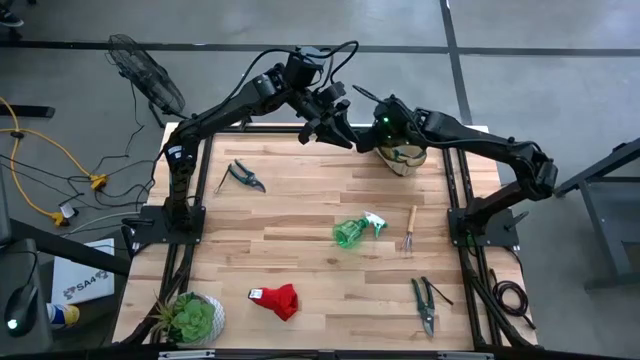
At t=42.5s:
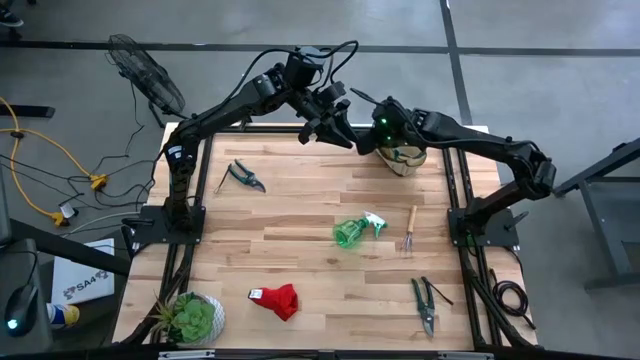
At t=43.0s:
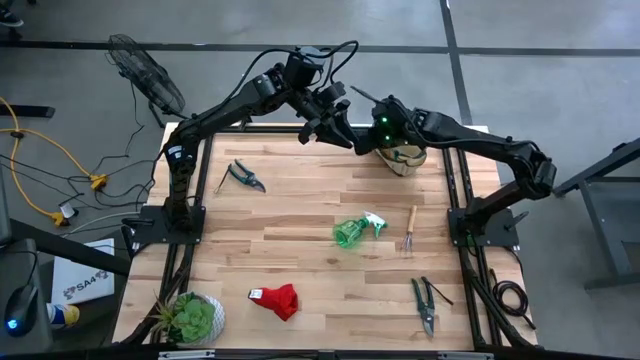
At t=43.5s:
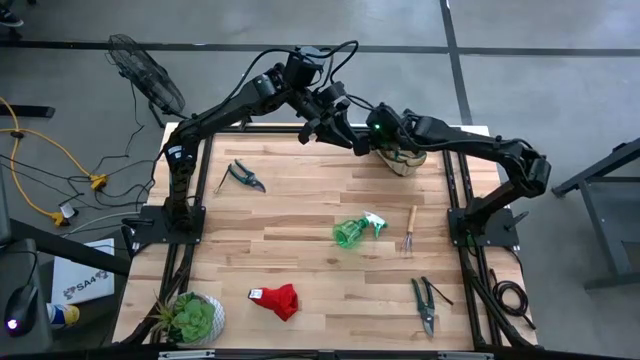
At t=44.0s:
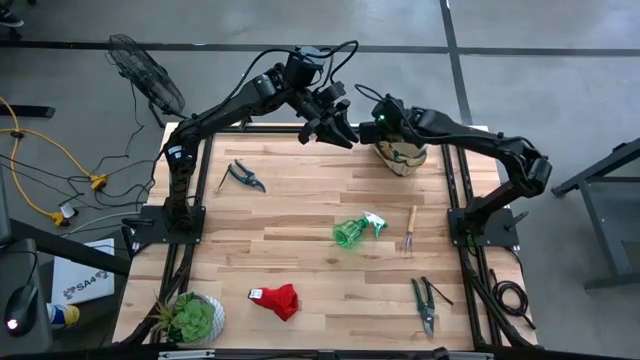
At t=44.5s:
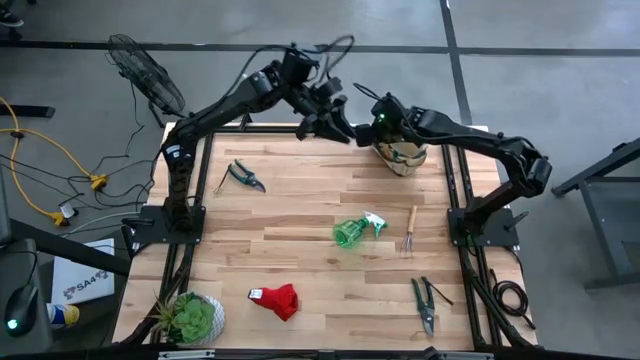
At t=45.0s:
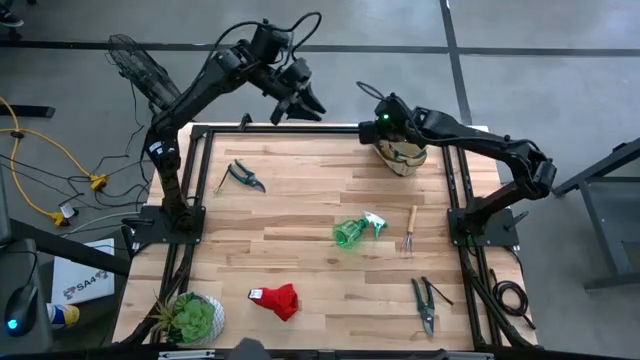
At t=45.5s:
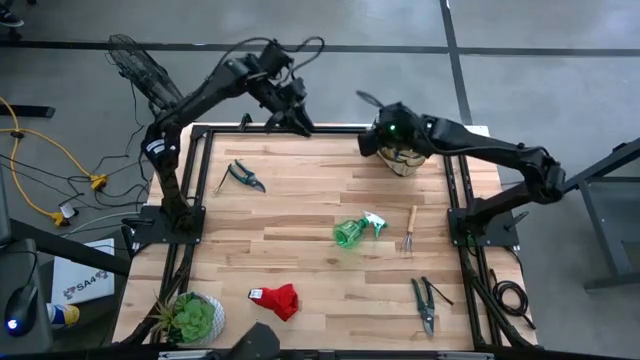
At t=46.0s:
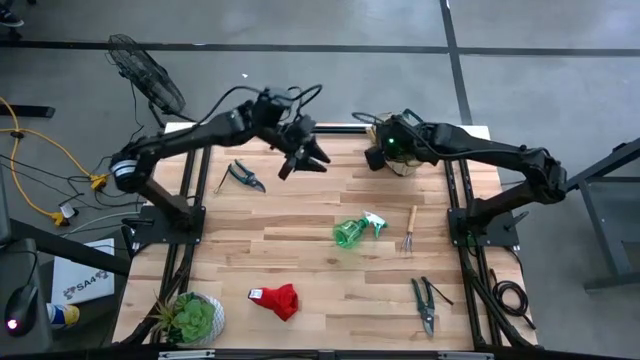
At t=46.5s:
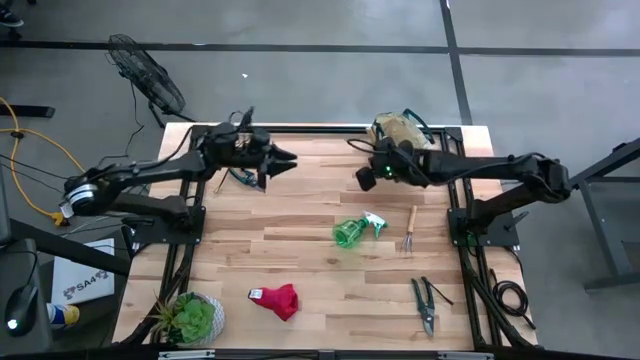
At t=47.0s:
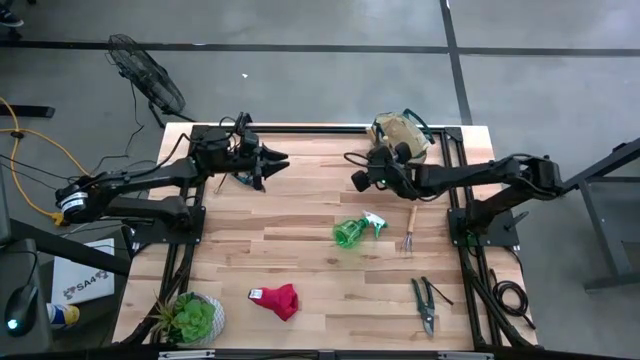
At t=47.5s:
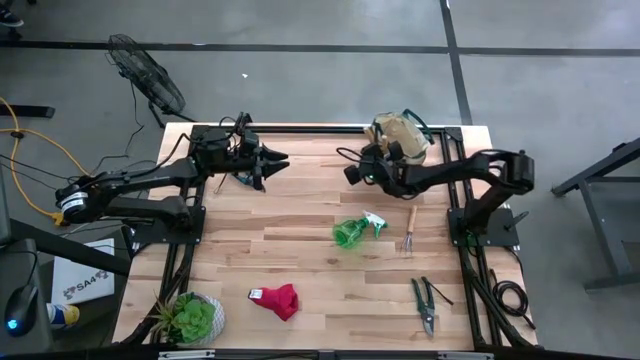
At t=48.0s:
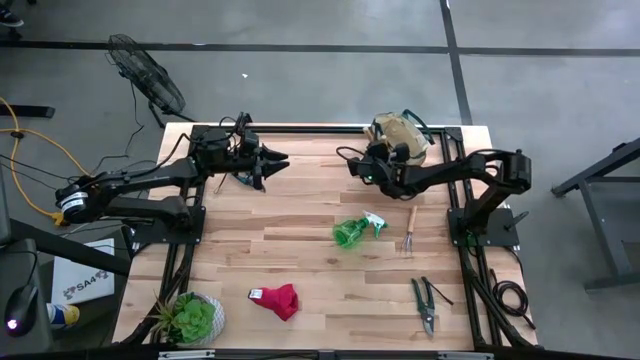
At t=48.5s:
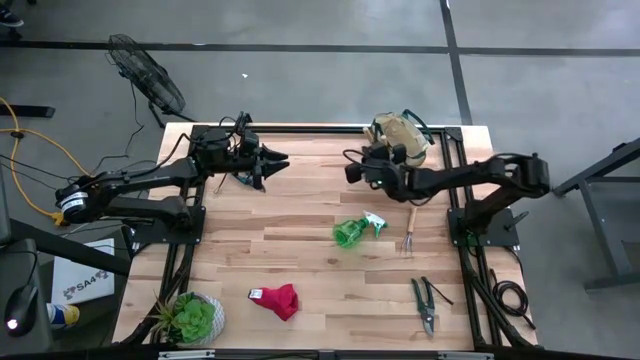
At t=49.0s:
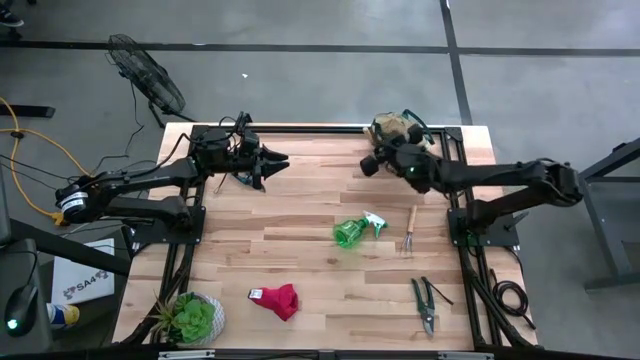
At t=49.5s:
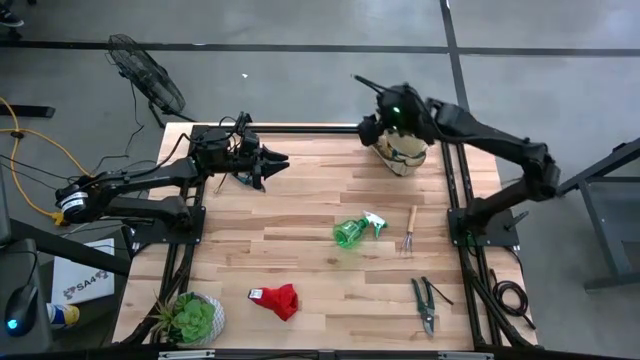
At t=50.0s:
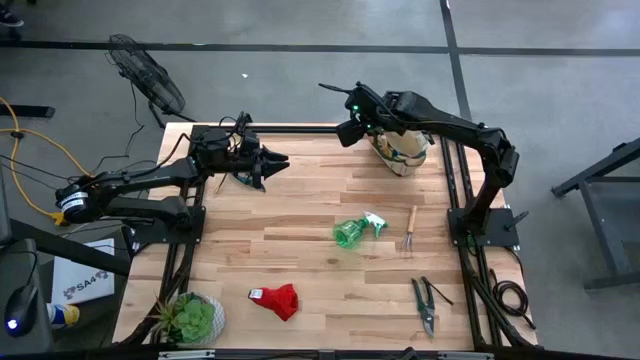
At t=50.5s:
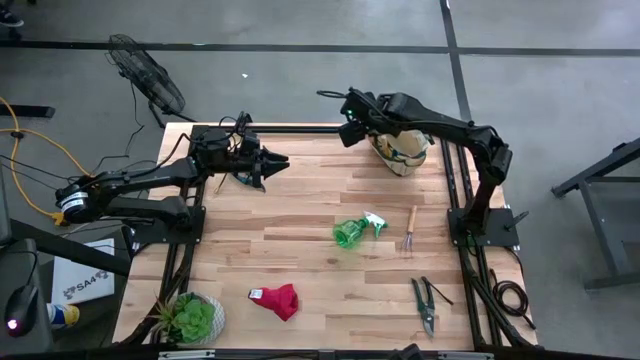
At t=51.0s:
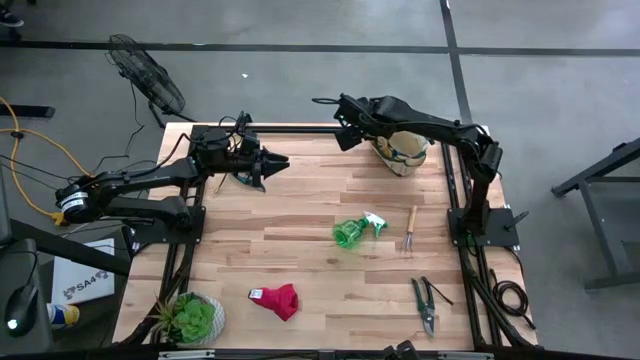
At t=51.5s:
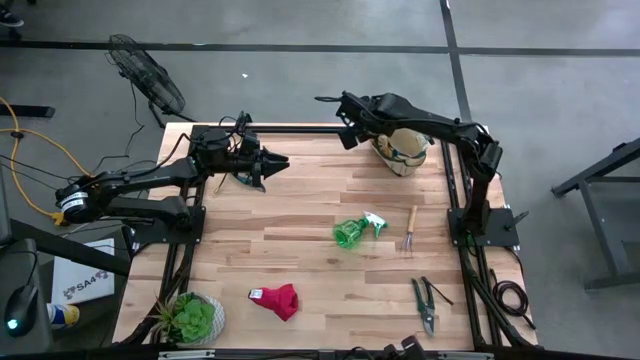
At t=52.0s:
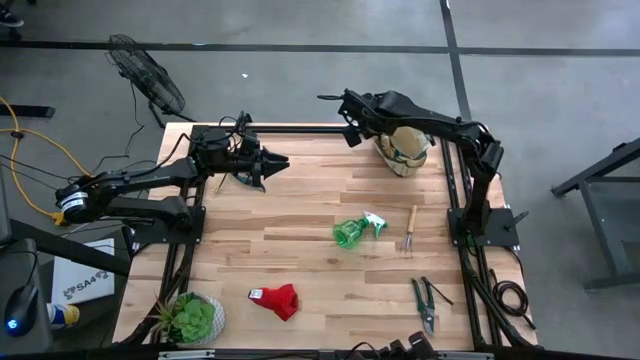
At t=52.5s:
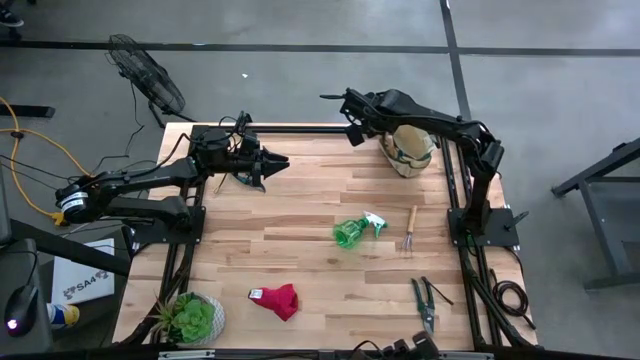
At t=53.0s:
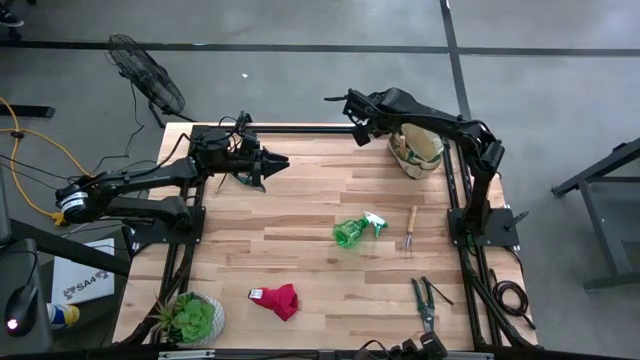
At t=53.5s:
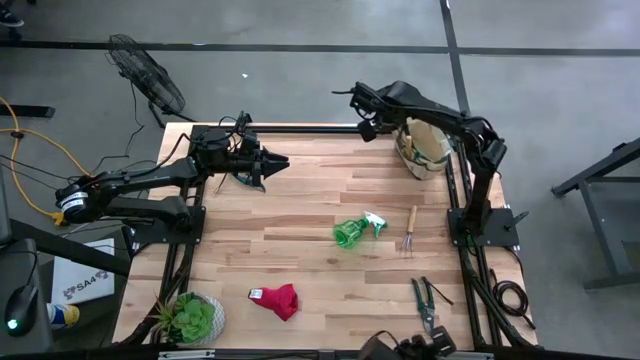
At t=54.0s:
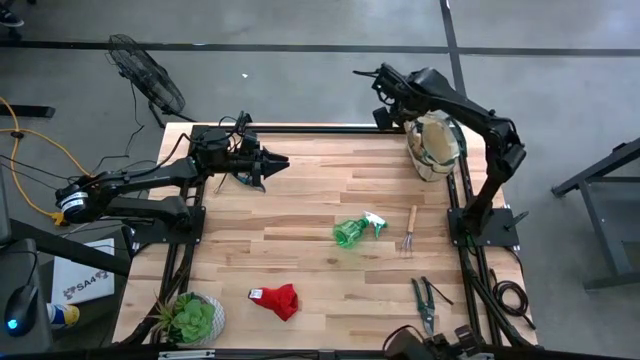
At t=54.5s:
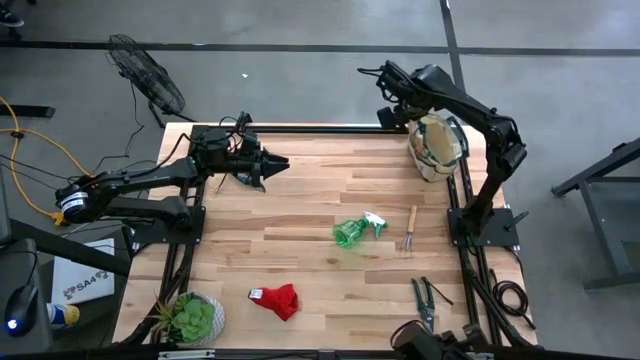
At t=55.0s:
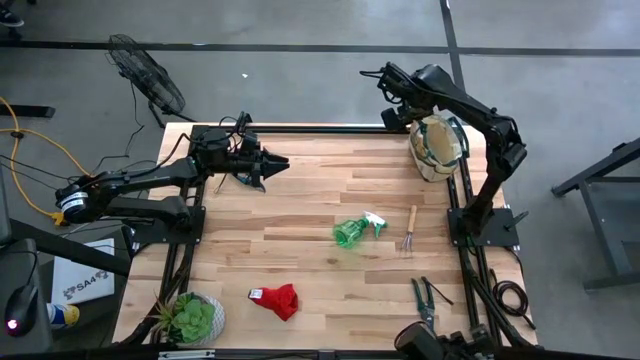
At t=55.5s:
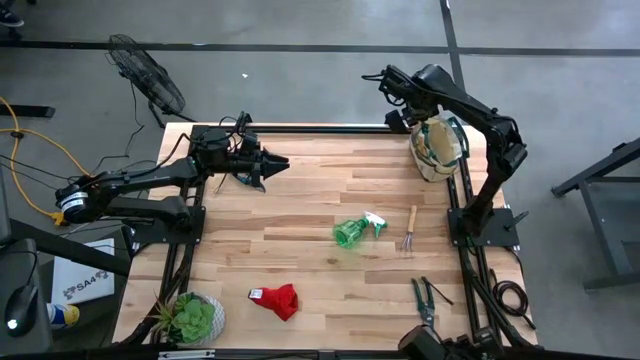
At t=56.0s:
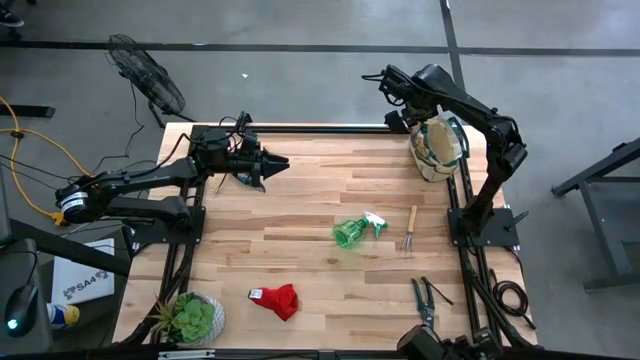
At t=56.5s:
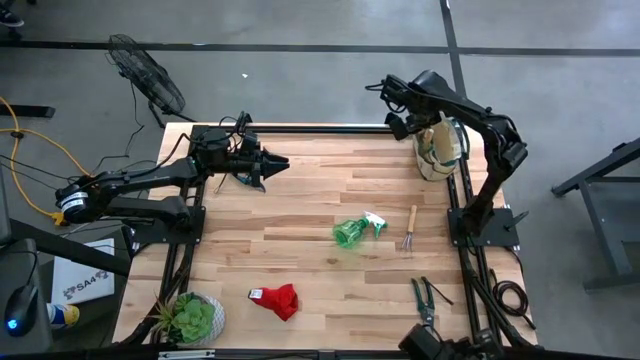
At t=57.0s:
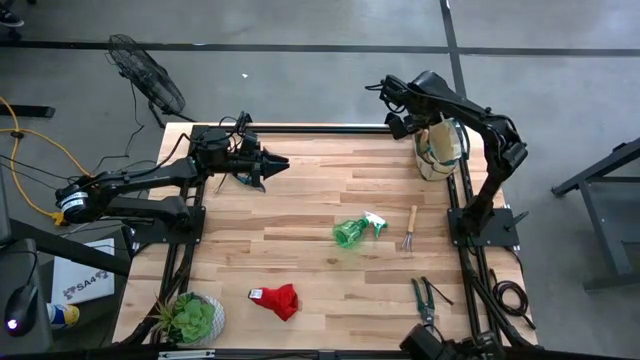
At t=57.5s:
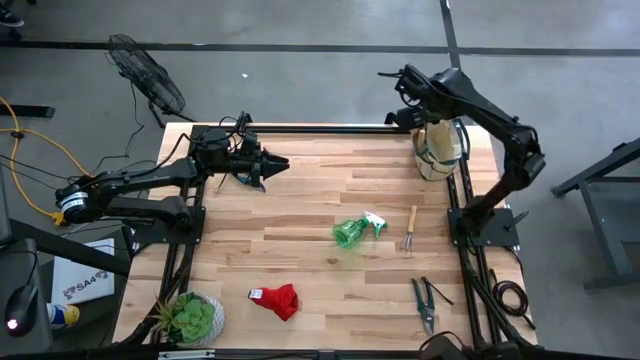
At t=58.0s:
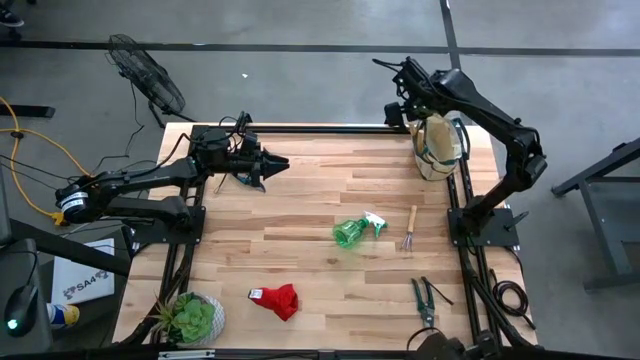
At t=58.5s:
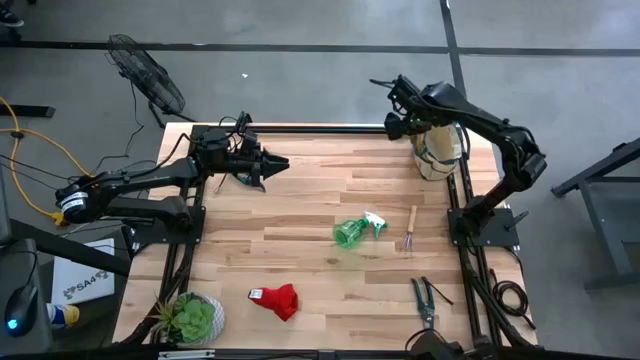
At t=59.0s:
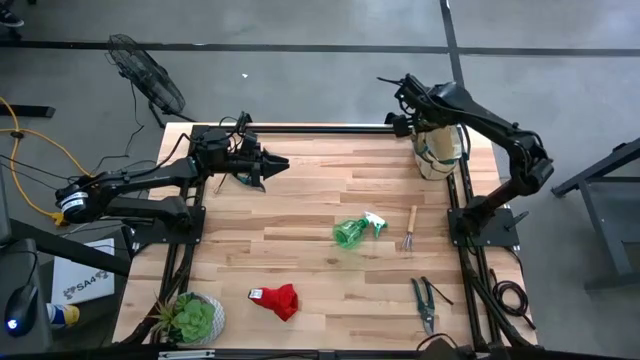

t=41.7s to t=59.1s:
Task: Pick & Place Garden tools in Gardening bag
Put the gardening trowel into the gardening bag

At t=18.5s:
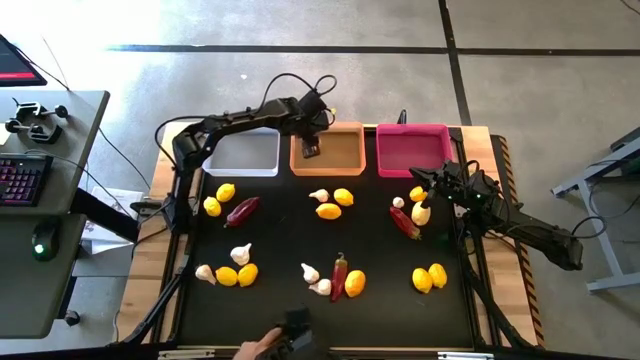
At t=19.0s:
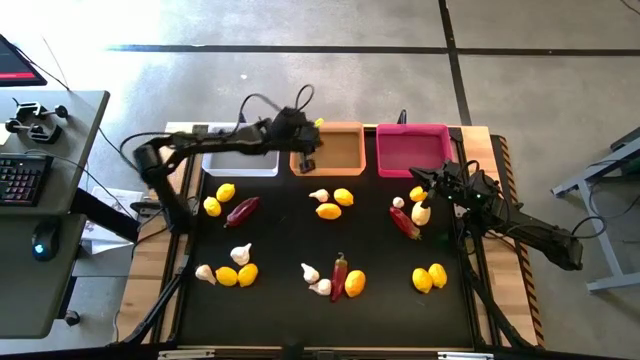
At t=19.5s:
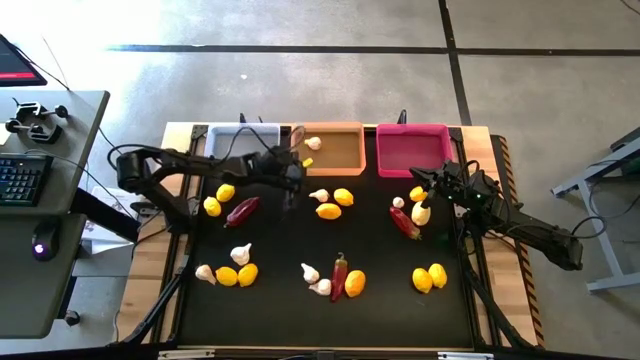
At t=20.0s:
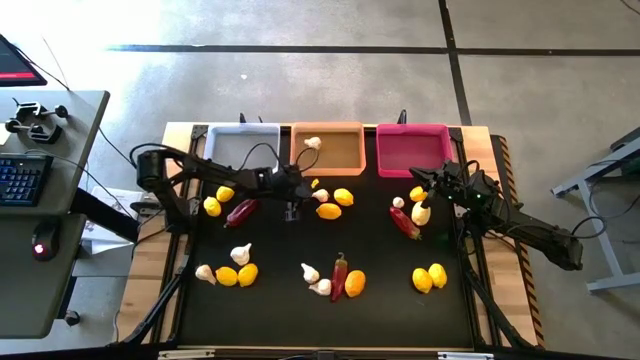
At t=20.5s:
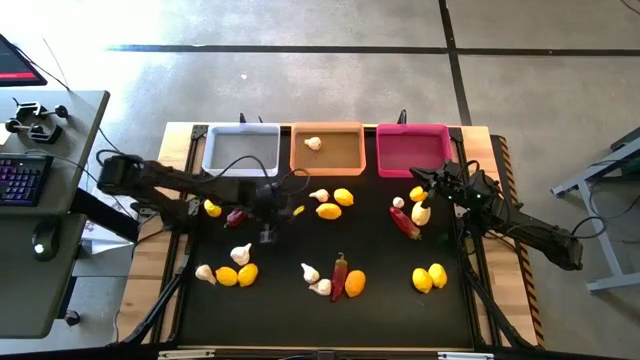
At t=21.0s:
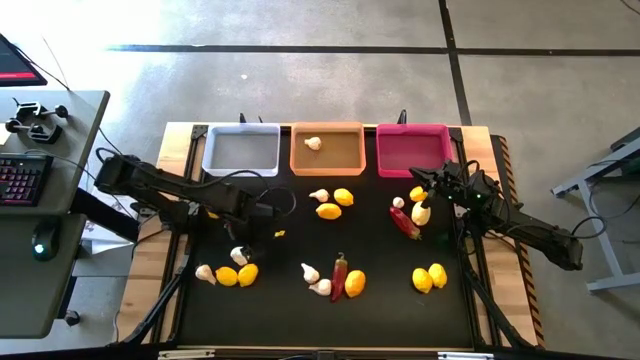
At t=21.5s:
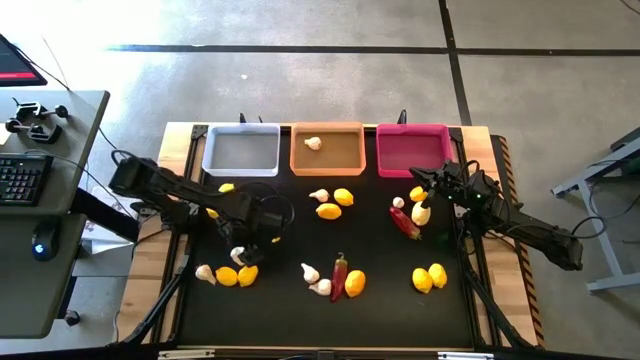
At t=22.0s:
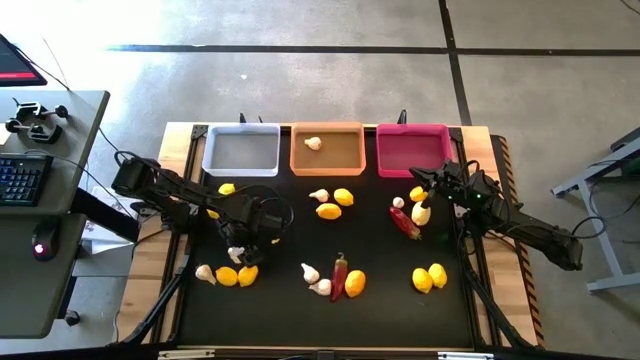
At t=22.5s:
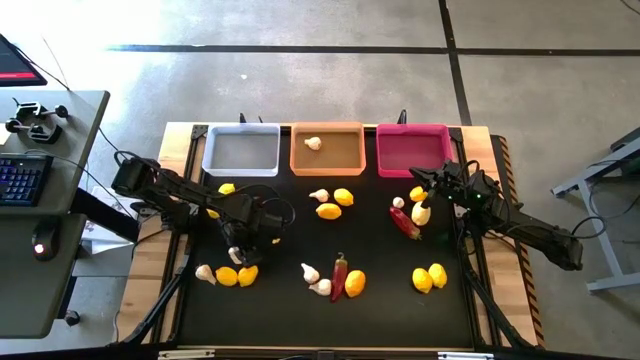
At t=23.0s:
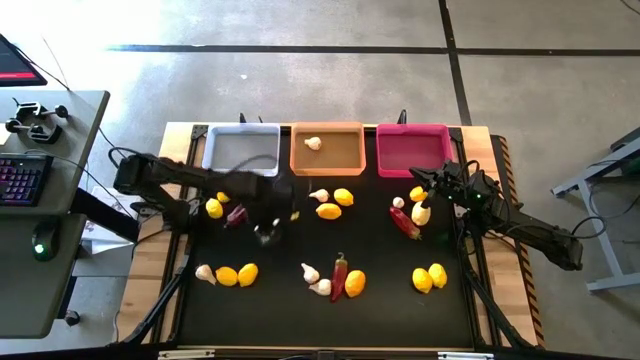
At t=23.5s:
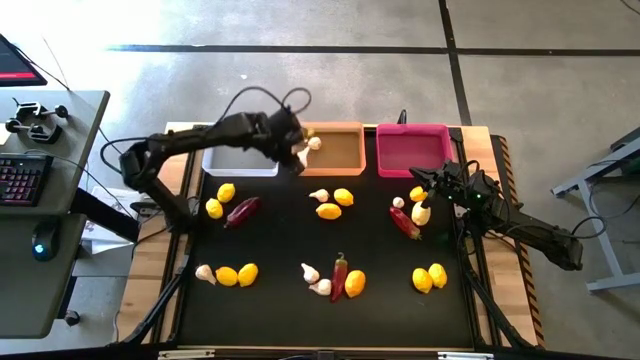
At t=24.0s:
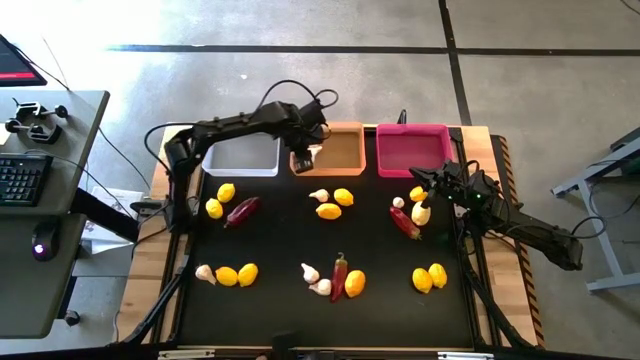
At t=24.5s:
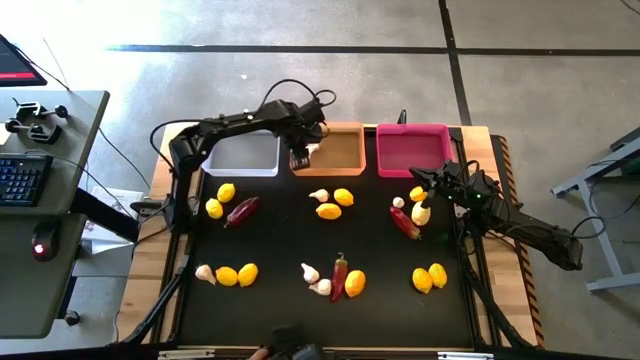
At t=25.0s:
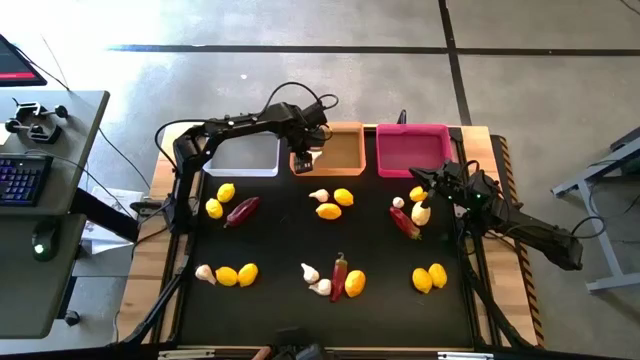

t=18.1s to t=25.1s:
Task: Sort produce into baskets
Put the white garlic into the orange bin
